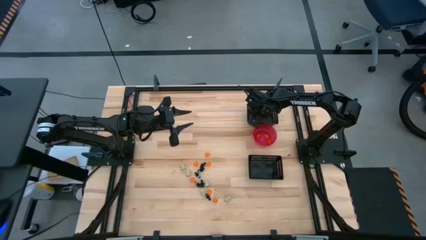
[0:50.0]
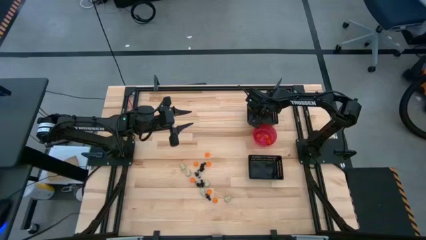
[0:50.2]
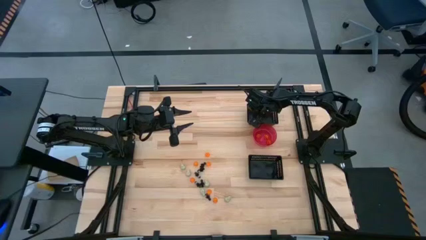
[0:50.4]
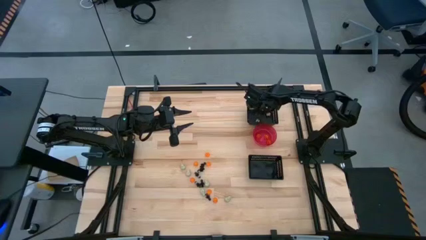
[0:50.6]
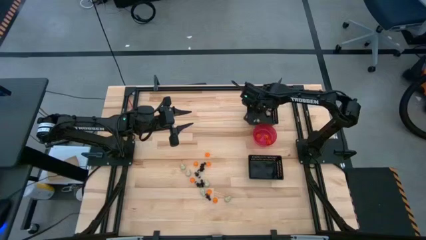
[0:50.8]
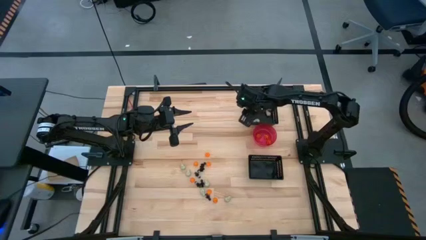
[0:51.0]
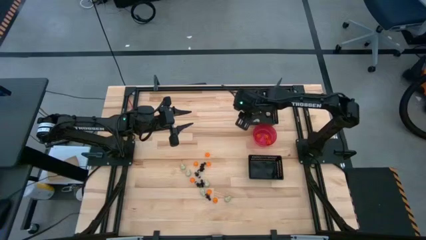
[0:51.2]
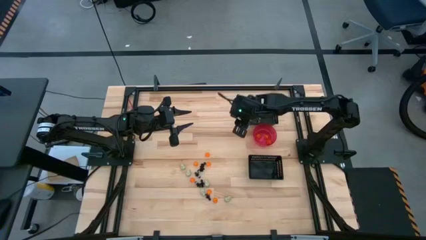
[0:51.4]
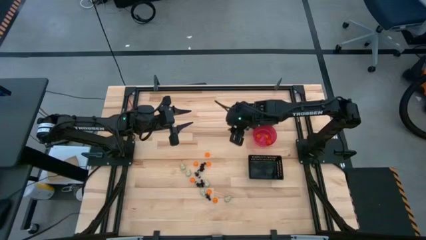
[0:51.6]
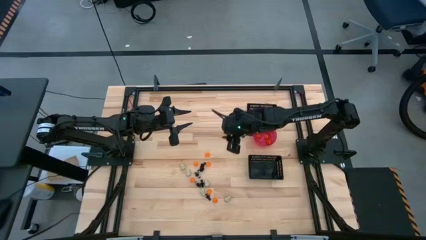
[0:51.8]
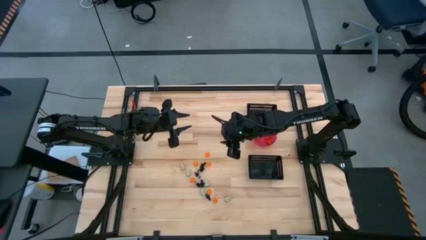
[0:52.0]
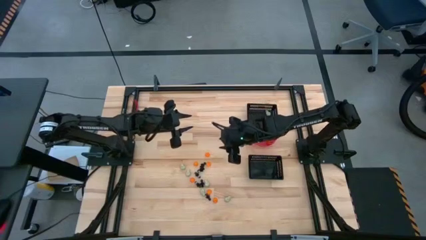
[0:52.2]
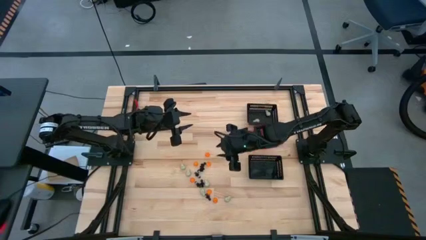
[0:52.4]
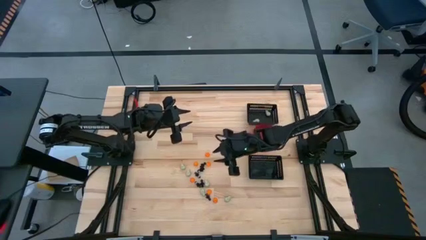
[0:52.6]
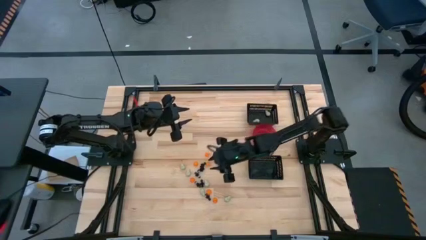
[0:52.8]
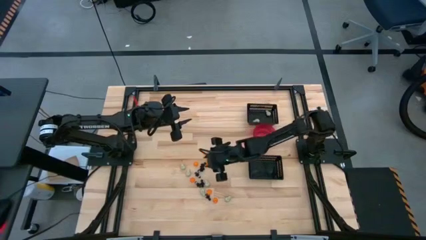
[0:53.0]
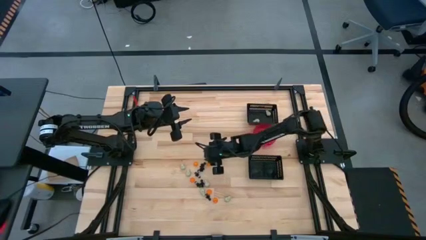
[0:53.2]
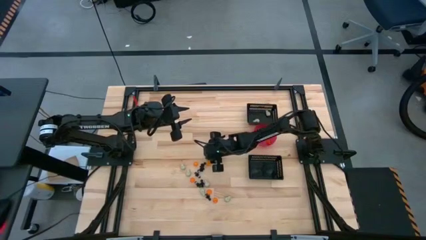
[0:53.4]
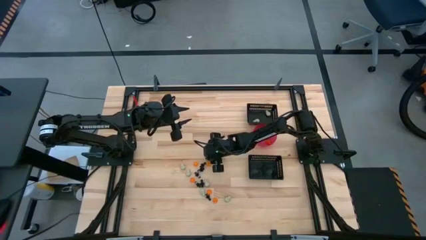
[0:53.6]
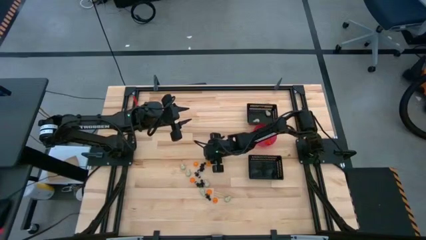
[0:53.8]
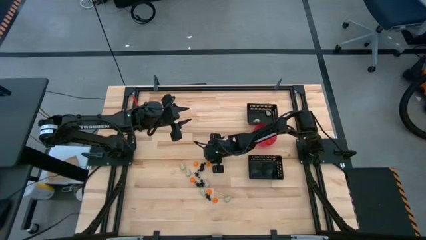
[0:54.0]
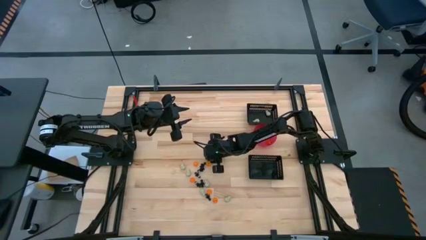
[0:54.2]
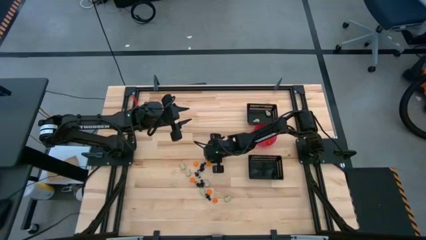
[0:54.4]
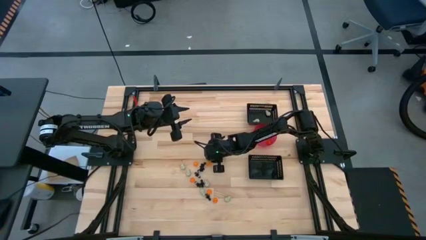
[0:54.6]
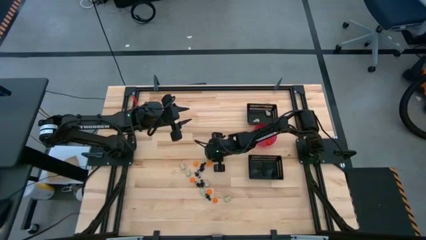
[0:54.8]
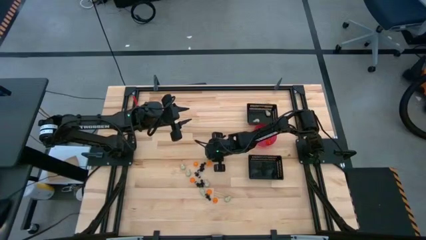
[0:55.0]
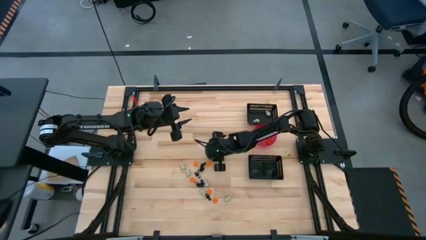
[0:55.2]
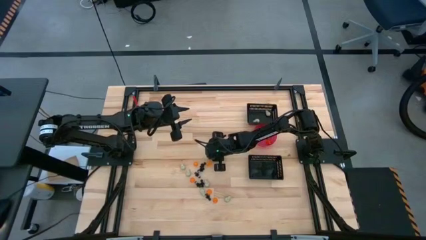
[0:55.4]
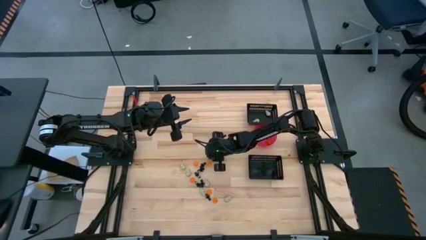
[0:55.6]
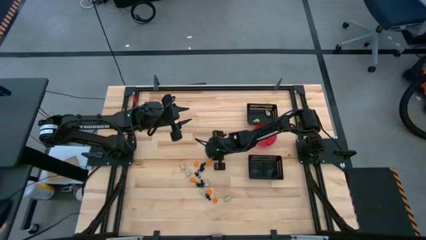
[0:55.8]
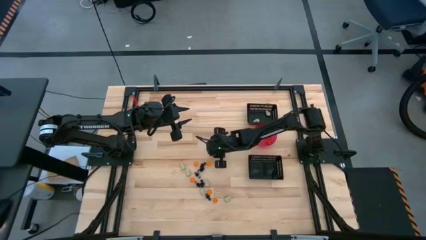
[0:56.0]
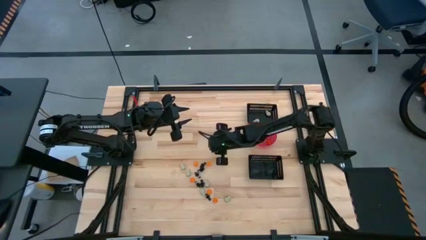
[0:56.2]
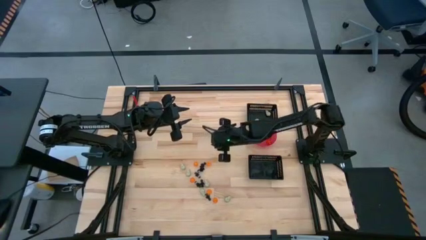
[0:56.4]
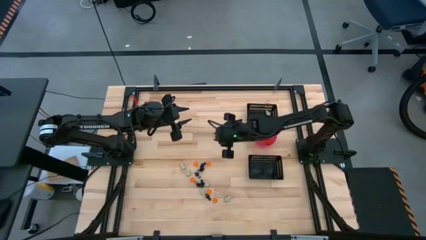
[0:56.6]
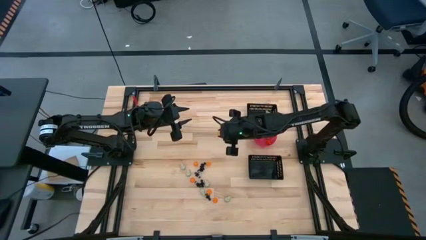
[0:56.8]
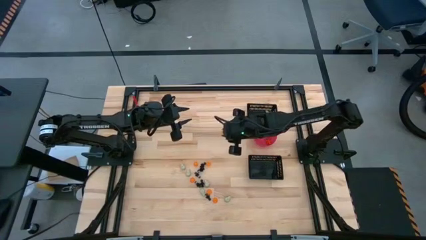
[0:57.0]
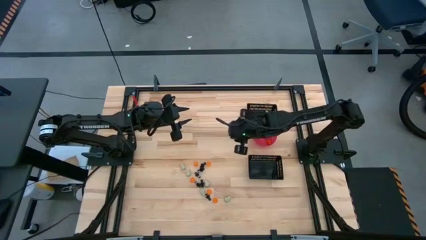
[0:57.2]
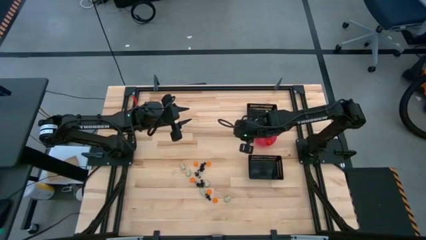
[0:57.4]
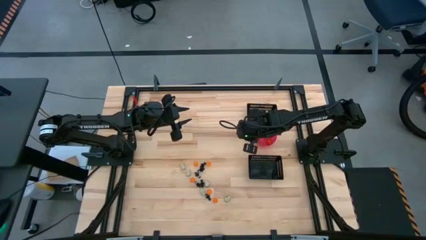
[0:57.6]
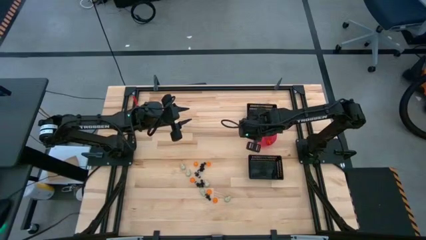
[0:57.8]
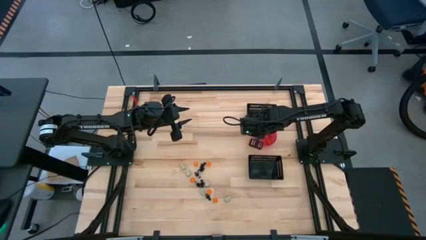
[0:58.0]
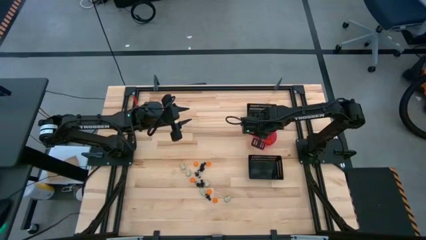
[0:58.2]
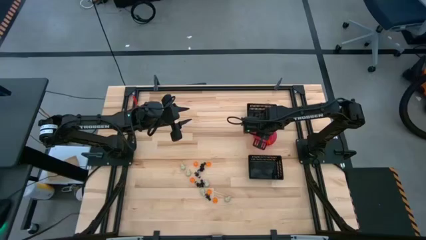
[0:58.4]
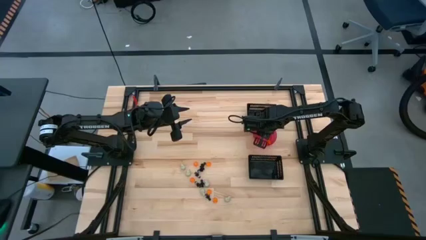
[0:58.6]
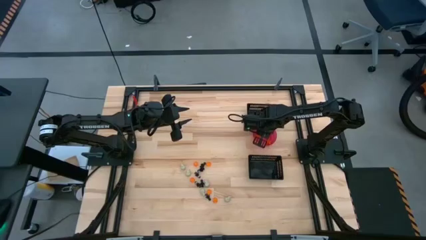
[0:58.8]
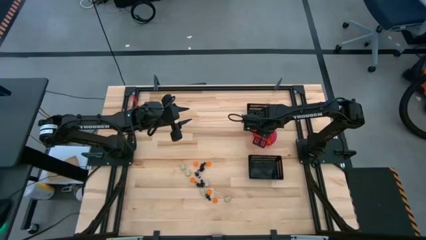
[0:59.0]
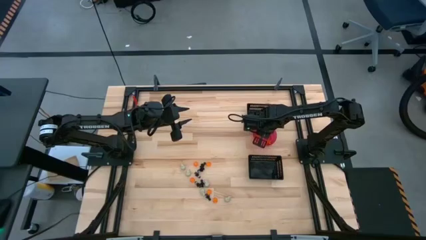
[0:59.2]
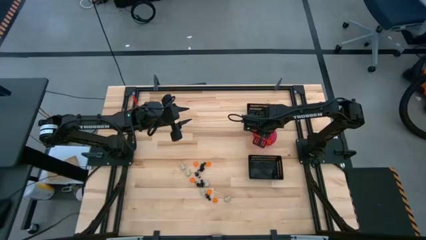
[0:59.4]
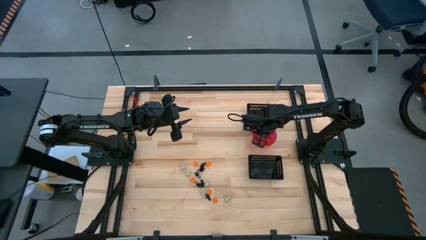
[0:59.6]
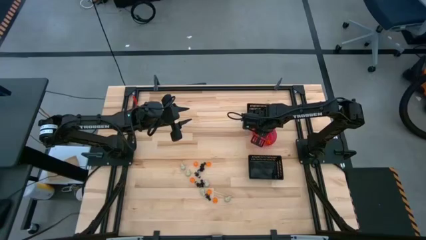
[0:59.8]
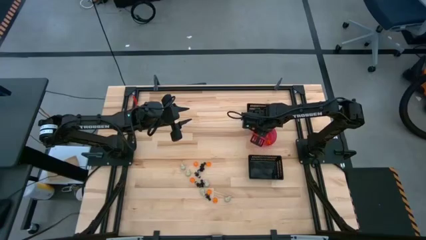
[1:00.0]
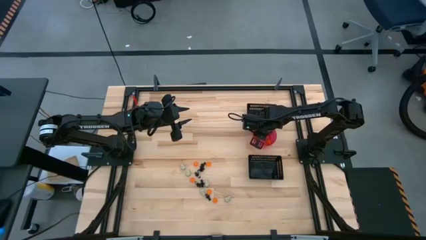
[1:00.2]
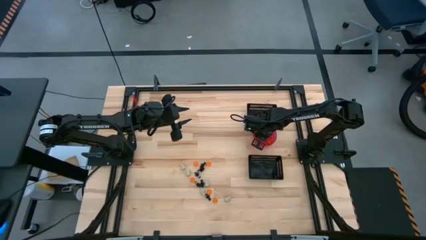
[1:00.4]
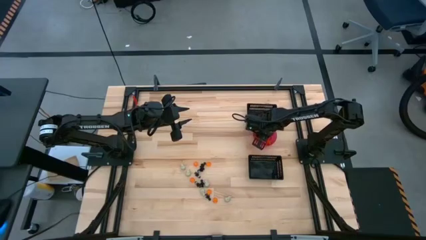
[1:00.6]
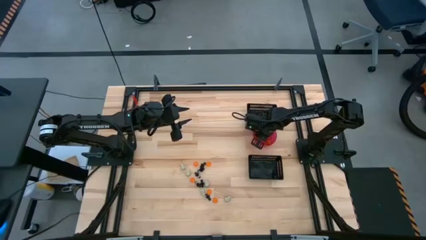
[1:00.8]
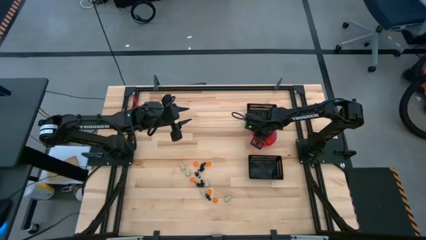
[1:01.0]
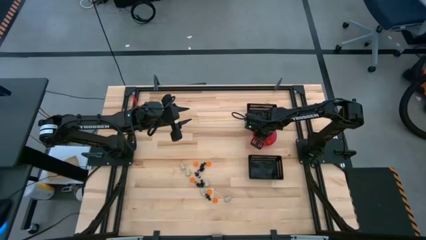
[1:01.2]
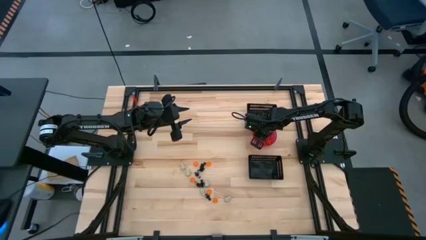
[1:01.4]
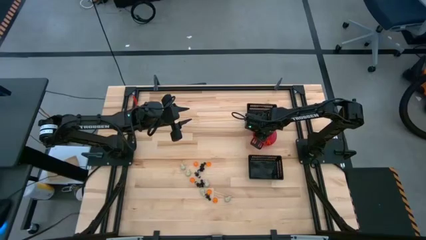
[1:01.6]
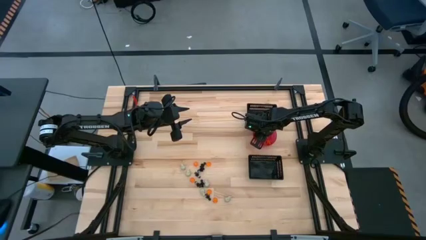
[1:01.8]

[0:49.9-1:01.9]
Task: Sort Halloween decoration
Put the orange pumpkin toy into the pink bowl

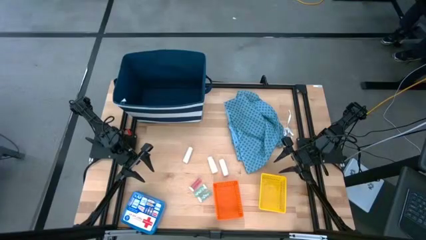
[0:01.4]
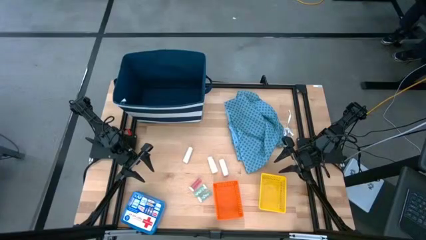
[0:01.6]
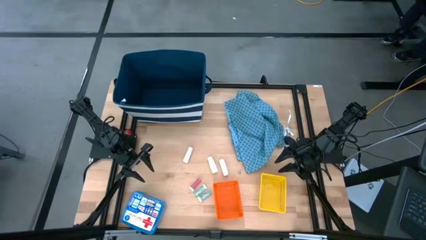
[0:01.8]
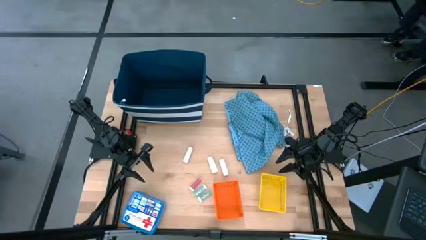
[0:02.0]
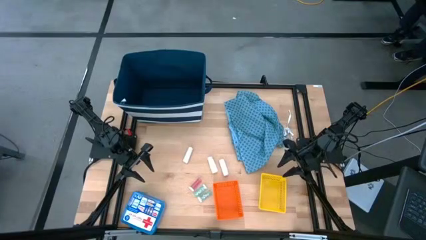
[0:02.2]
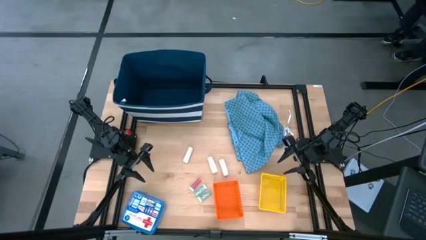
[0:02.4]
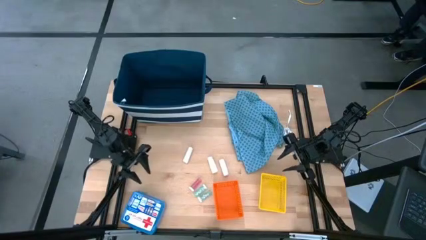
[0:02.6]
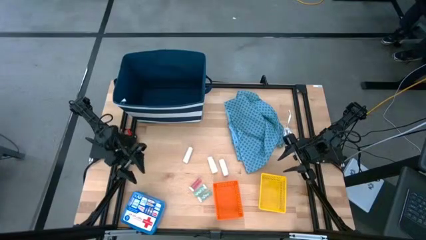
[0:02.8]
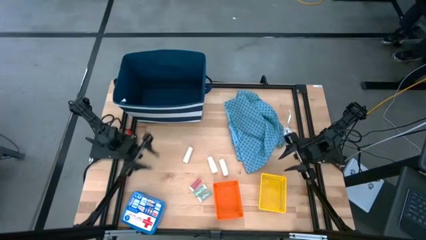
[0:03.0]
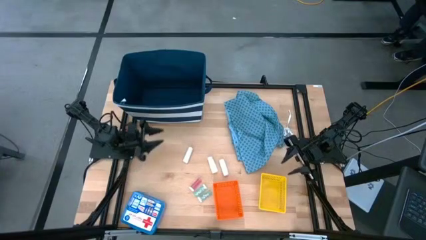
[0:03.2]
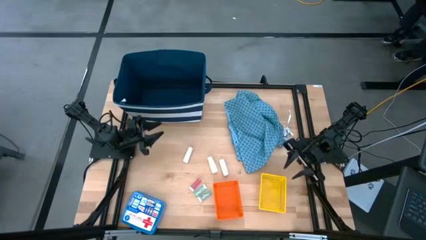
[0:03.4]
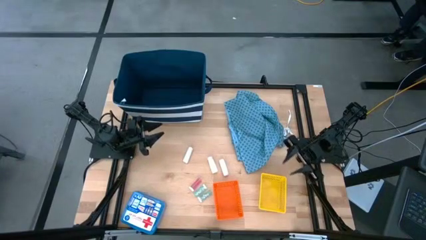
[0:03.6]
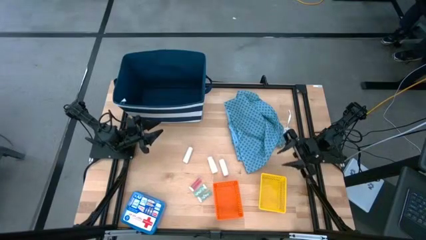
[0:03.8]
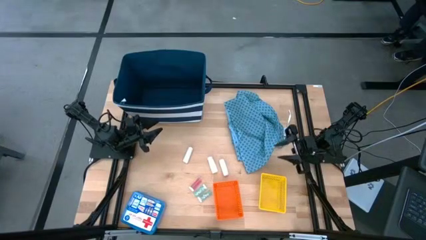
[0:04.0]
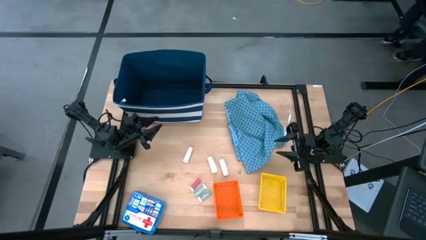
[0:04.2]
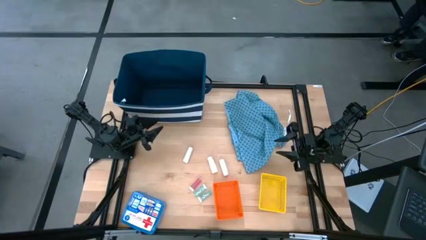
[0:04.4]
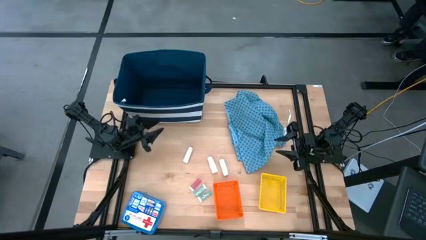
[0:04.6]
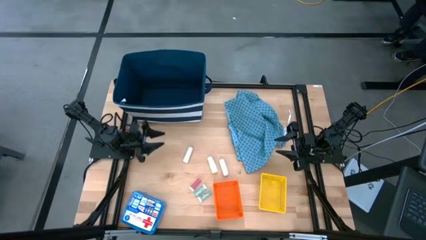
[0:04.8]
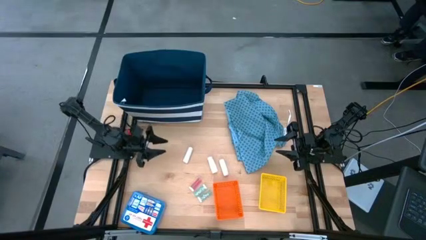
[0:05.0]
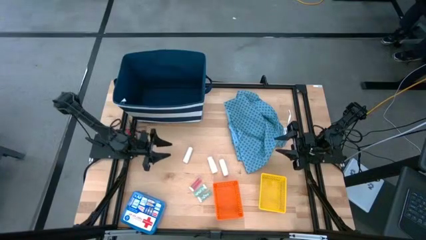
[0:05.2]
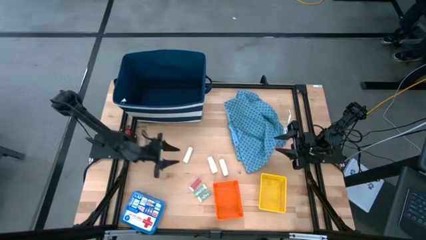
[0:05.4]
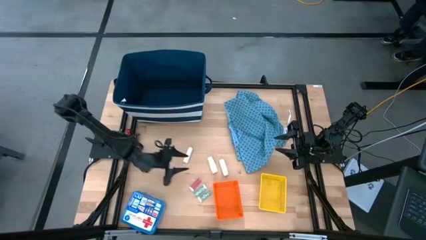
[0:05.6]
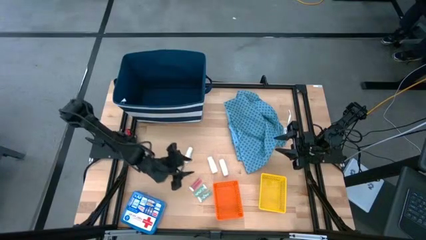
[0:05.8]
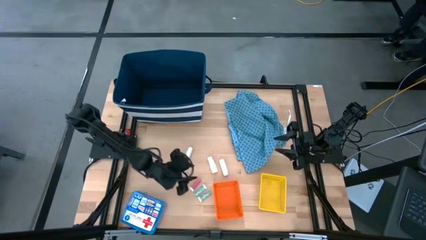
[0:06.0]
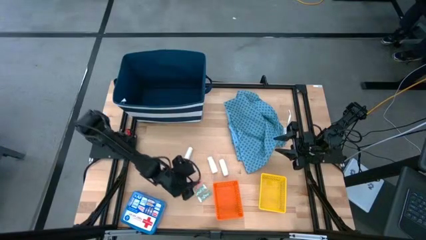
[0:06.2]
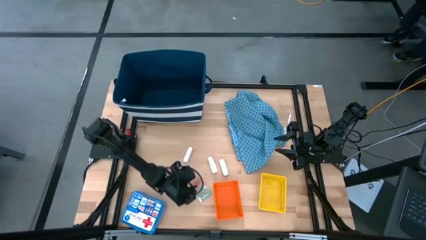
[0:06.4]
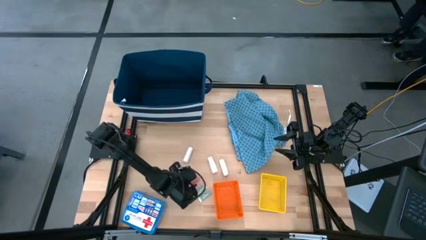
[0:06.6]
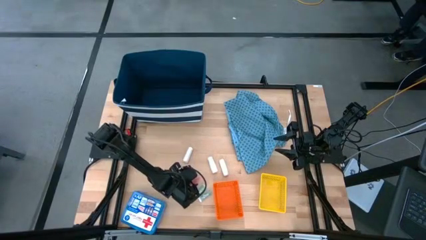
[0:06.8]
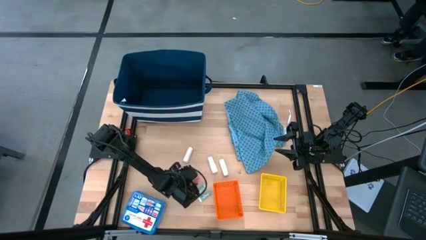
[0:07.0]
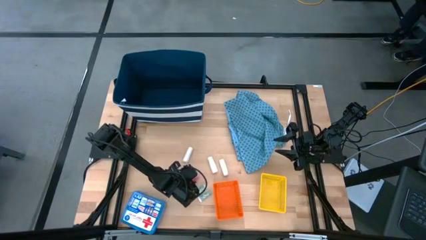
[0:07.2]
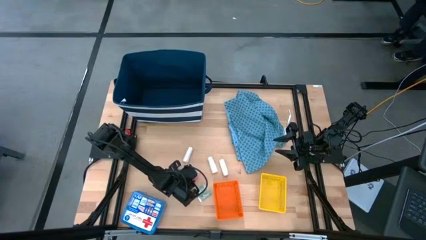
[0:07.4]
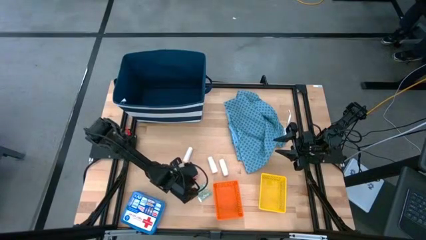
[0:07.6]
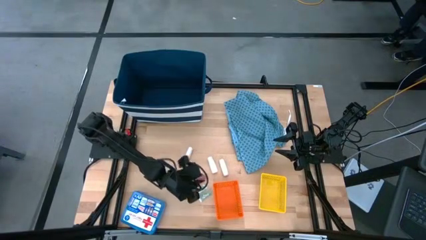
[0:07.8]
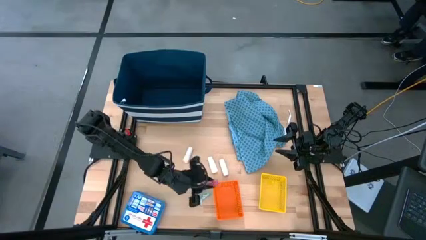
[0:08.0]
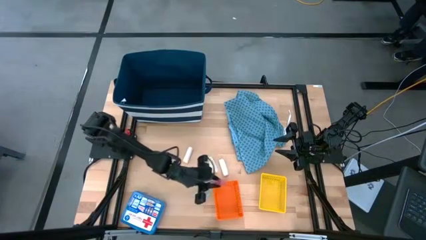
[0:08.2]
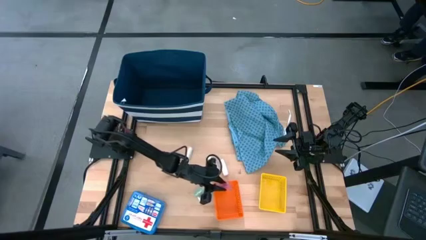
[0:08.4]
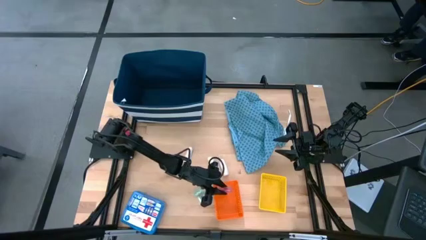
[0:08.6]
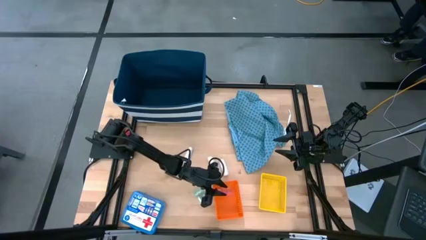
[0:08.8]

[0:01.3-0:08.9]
Task: Pick & Place Medicine items
Put the red pill bottle into the orange bin
